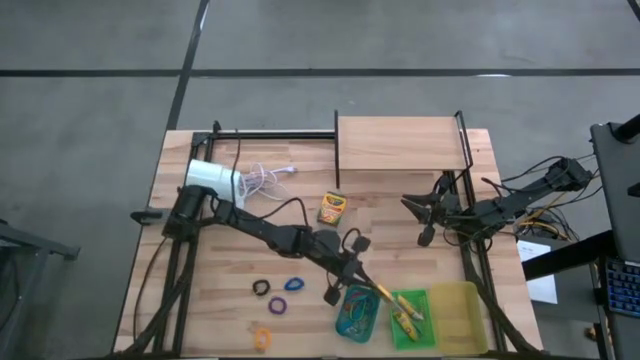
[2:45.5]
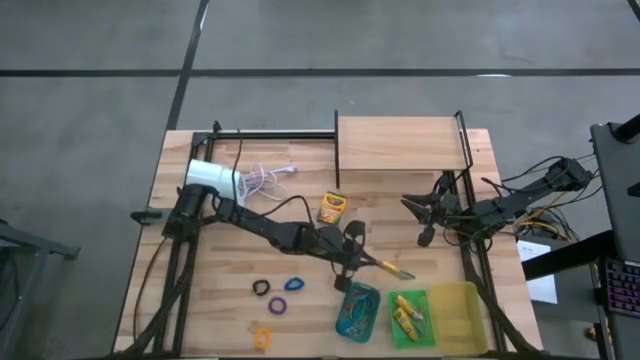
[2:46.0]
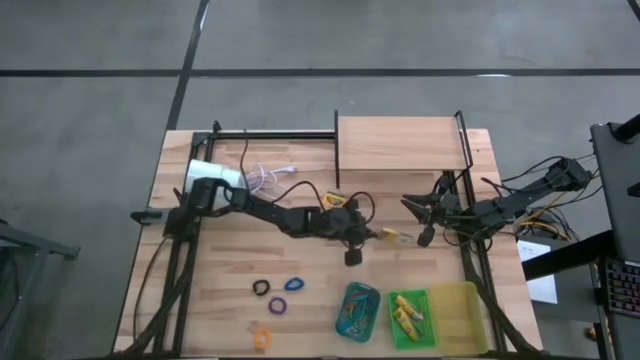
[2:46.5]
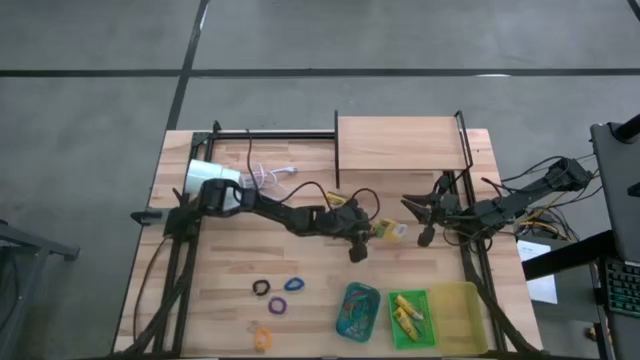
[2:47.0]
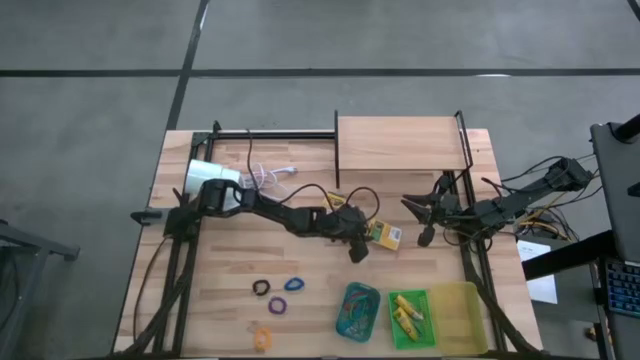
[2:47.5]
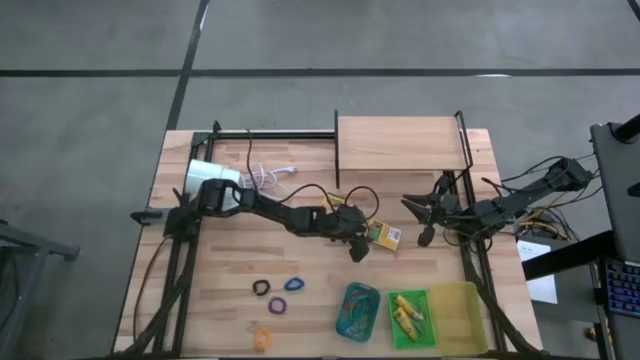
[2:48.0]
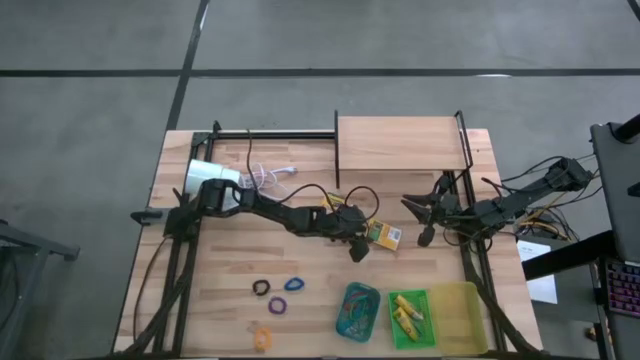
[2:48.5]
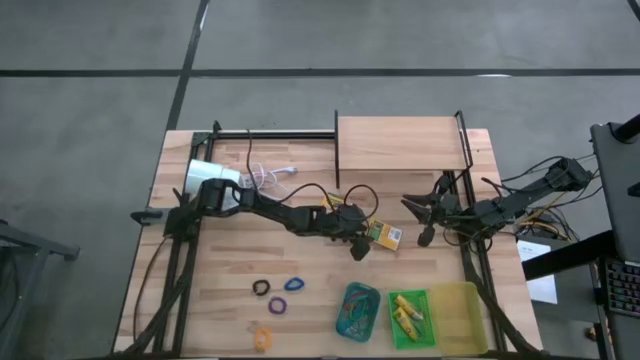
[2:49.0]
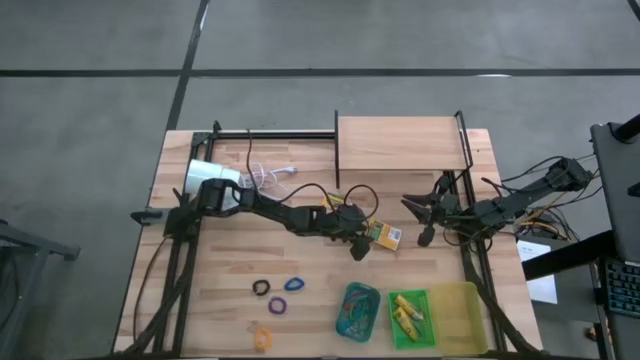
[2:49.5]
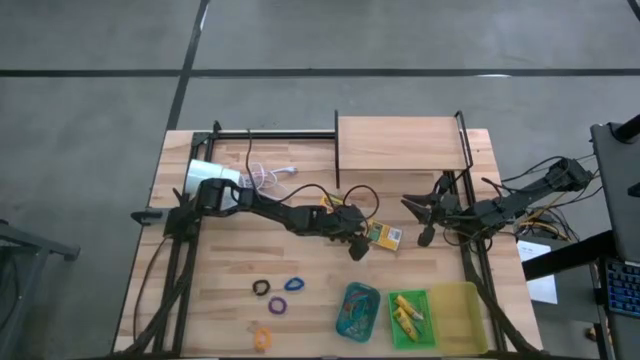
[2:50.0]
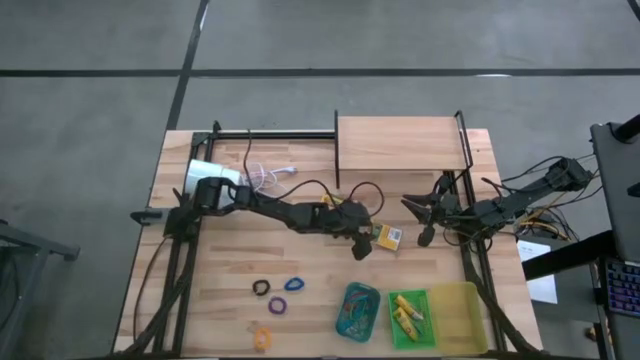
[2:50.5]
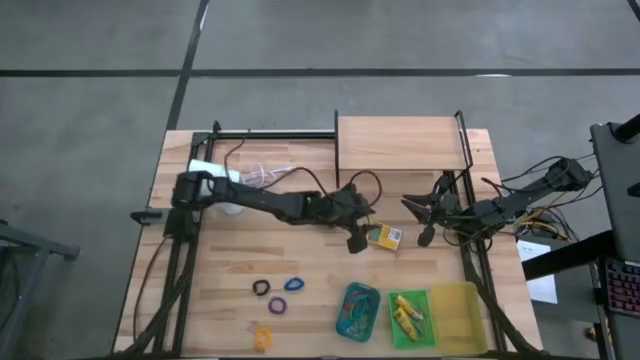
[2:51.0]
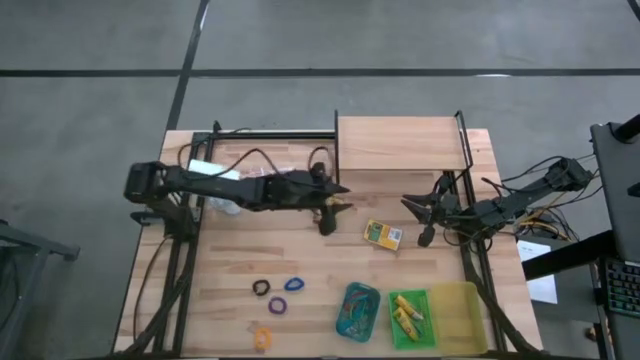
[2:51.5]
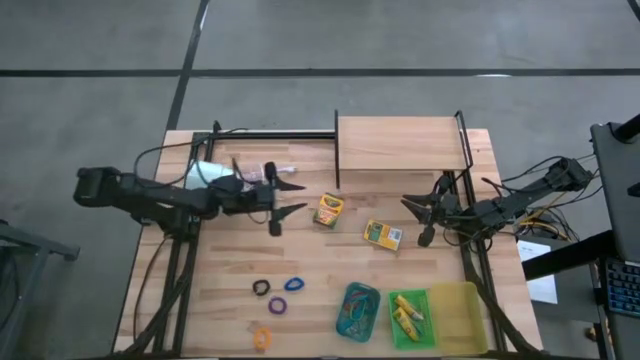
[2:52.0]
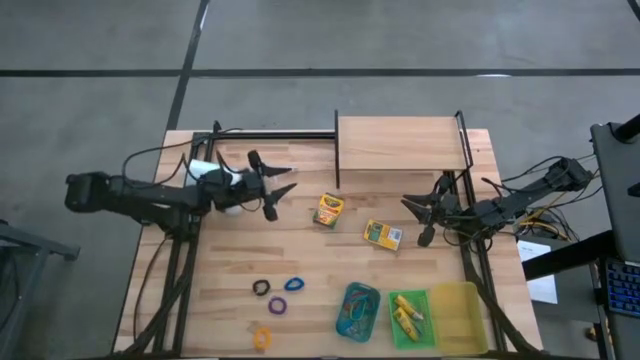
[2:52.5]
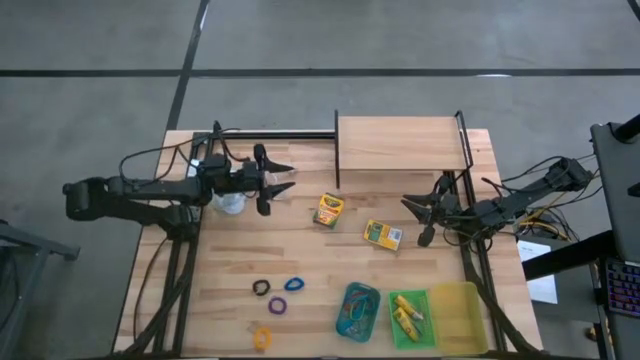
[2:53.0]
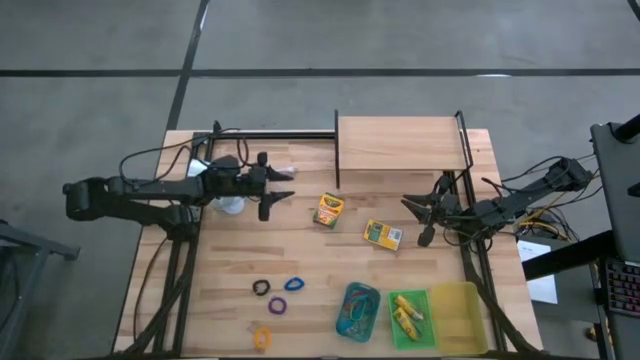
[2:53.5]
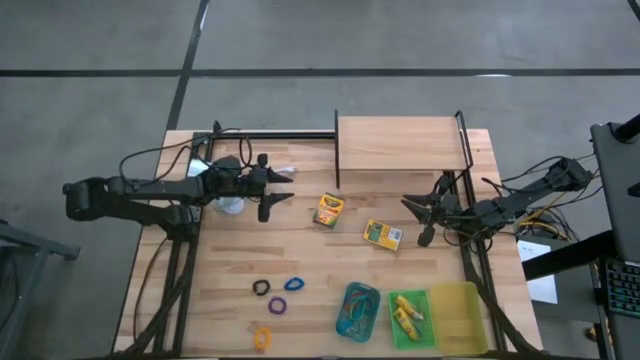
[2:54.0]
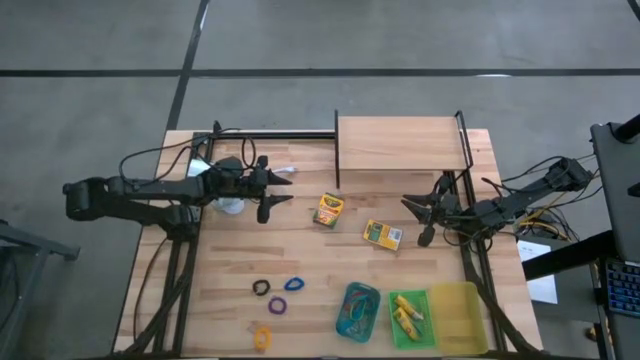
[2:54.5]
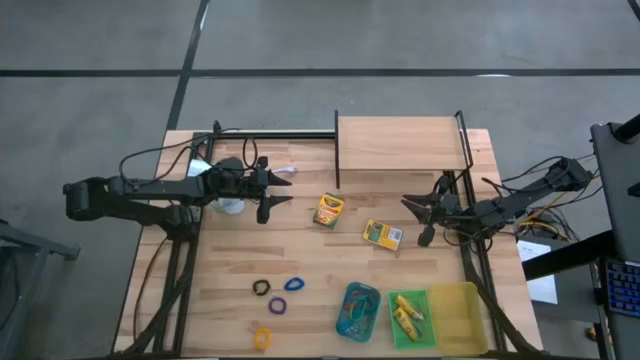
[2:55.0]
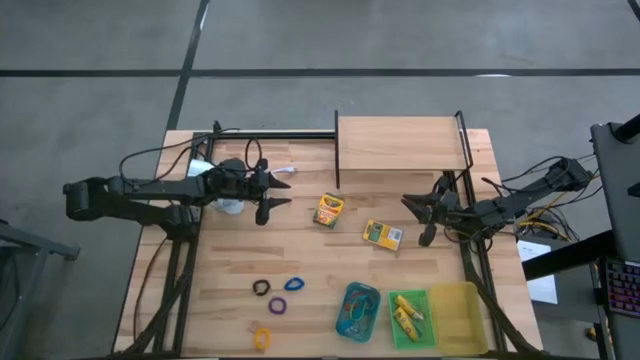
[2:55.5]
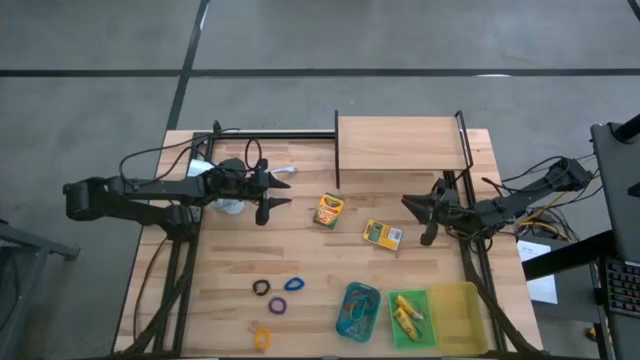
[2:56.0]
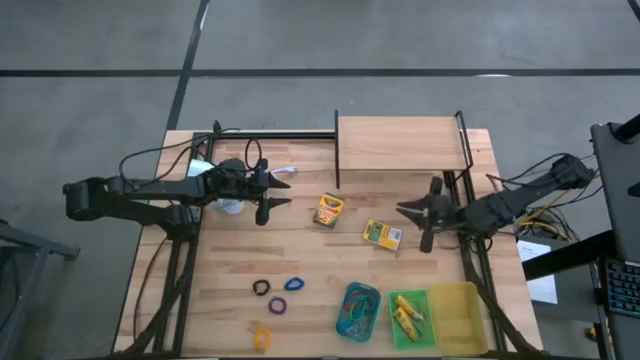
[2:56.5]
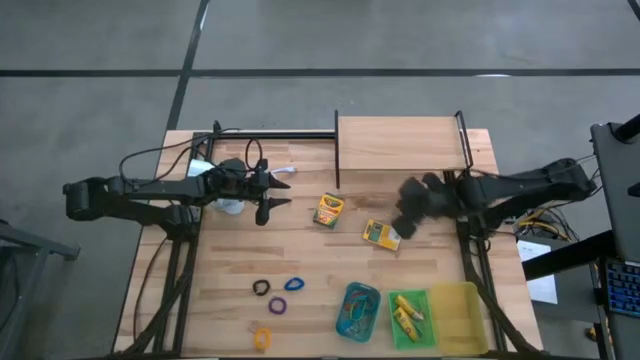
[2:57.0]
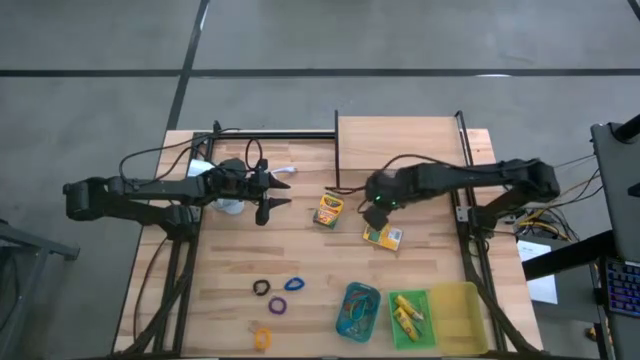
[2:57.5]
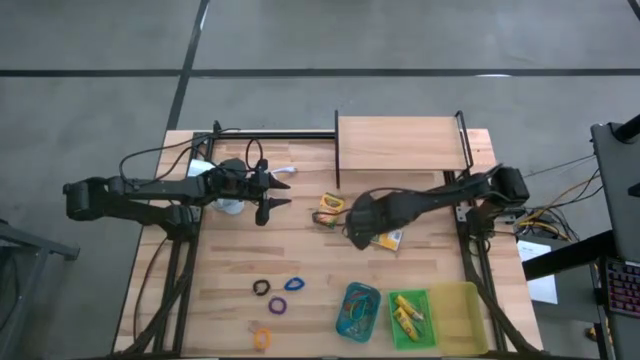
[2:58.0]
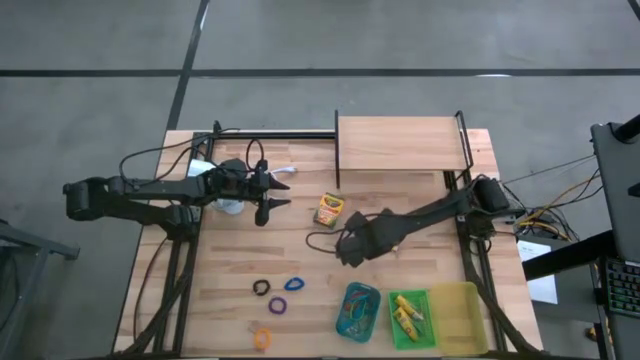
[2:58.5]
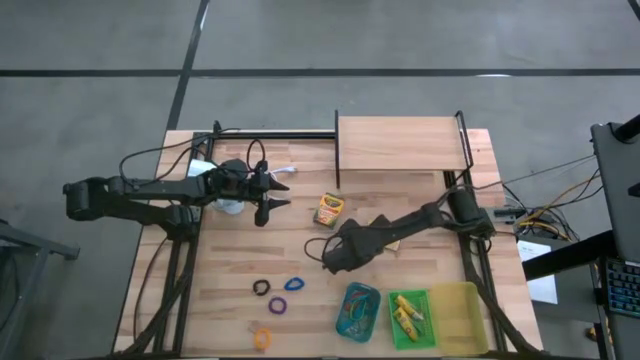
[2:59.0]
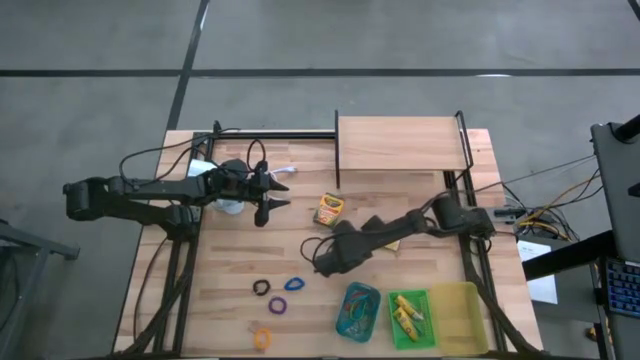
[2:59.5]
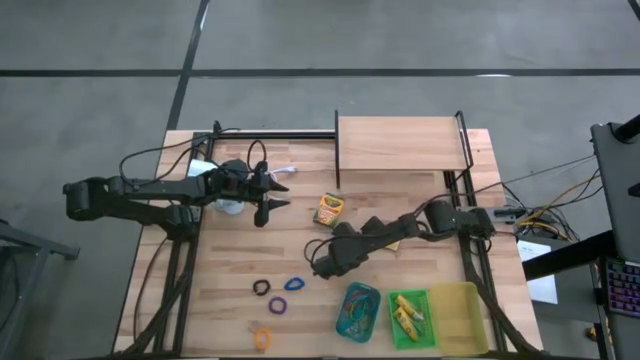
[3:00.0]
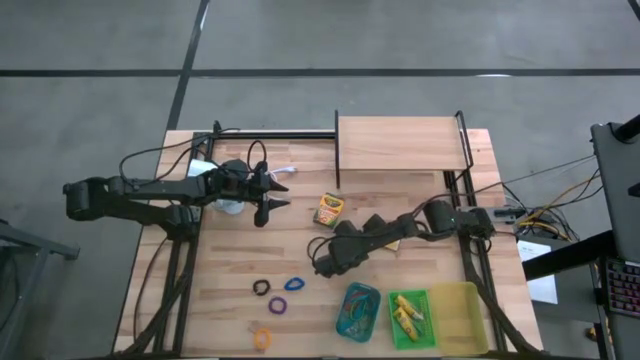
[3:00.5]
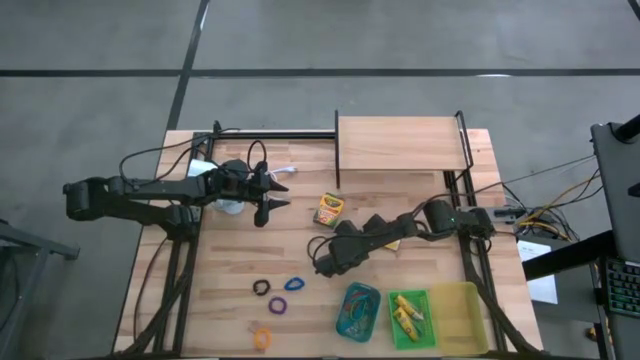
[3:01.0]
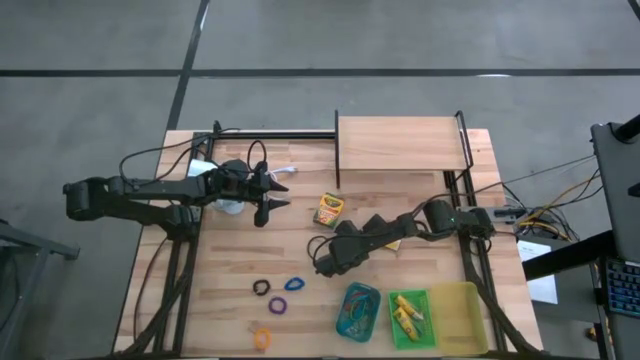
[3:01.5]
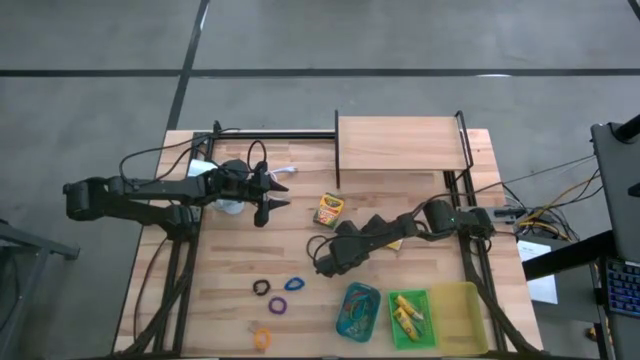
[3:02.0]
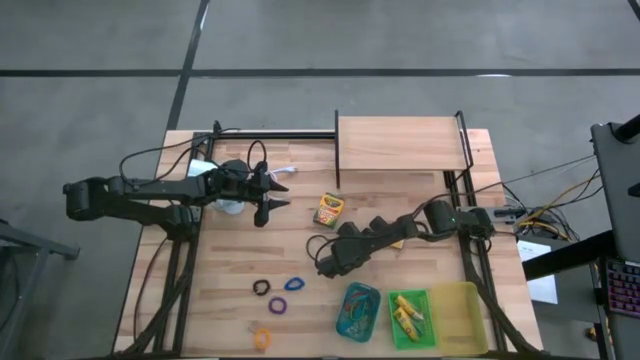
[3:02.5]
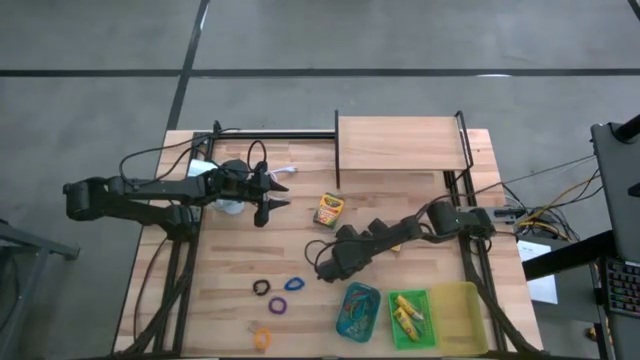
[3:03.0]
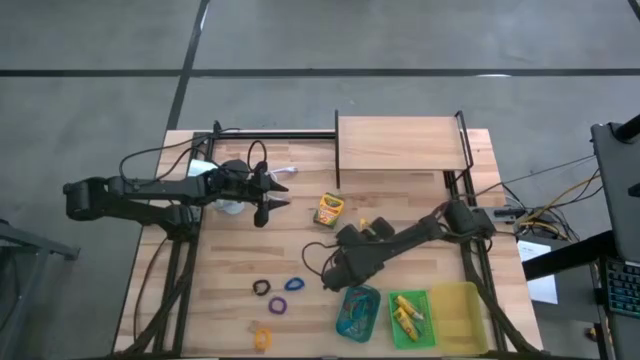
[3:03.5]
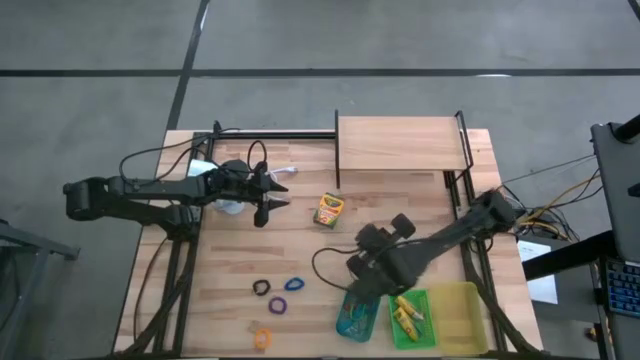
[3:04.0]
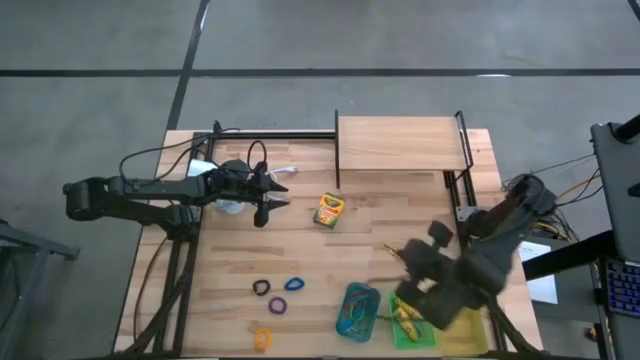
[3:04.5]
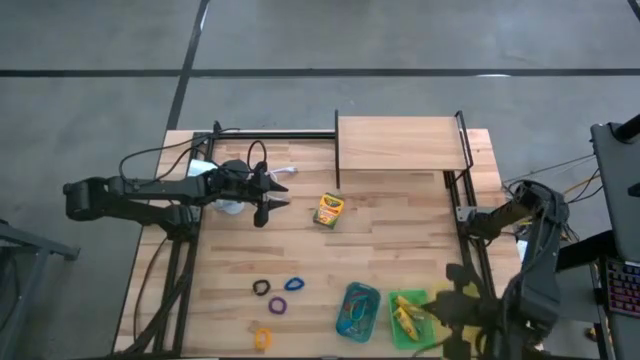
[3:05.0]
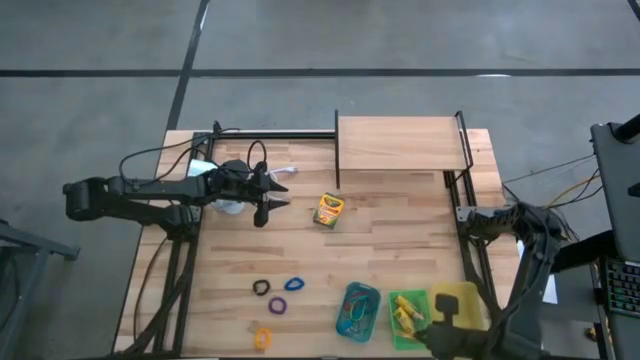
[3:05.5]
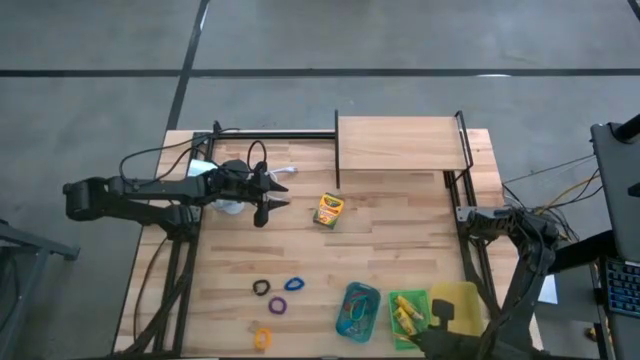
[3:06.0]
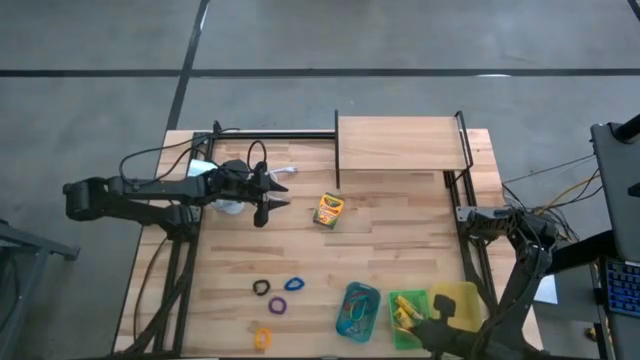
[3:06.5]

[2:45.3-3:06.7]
Task: Pick & Place Office Desk Supplies
Put the crayon box into the green bin
